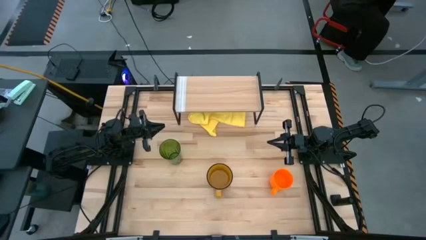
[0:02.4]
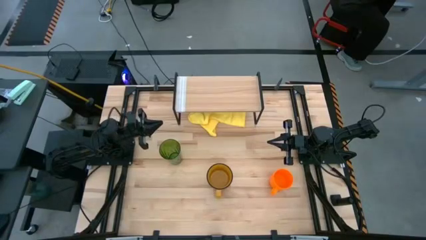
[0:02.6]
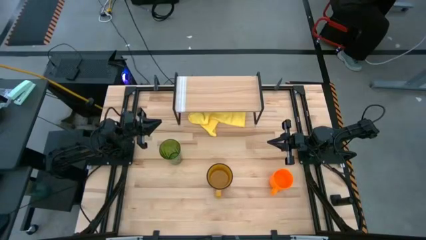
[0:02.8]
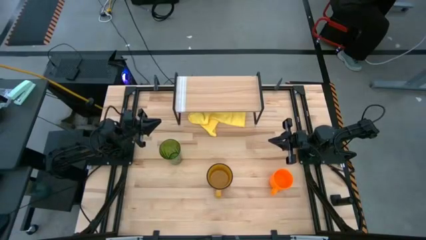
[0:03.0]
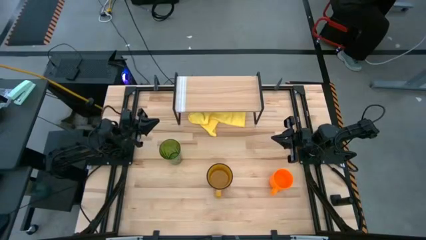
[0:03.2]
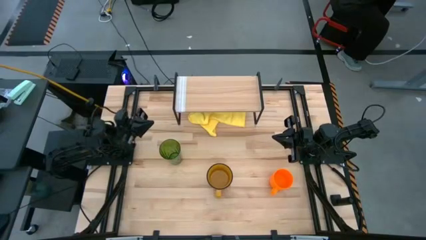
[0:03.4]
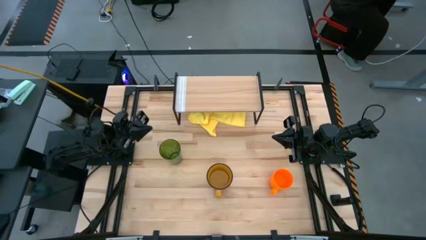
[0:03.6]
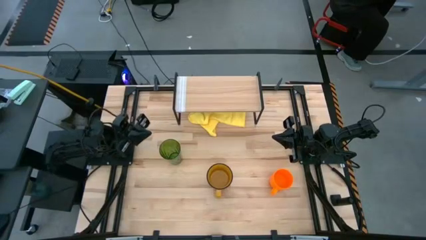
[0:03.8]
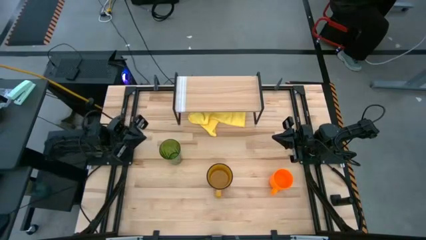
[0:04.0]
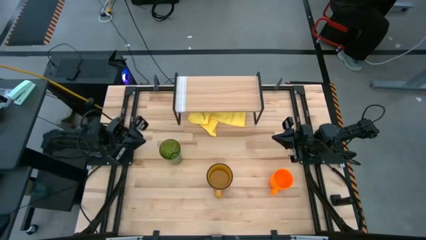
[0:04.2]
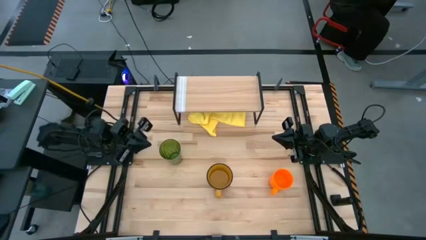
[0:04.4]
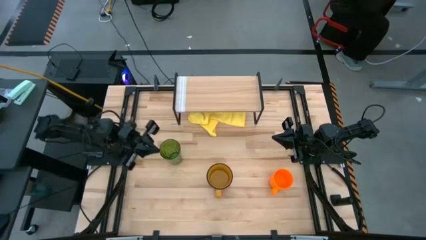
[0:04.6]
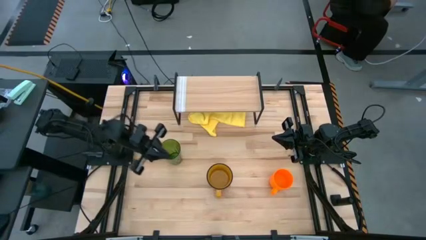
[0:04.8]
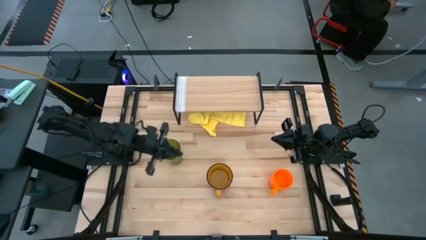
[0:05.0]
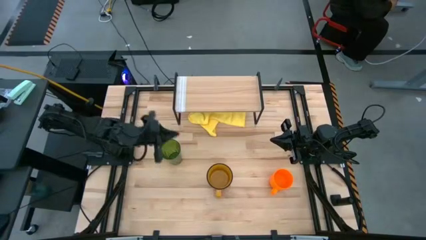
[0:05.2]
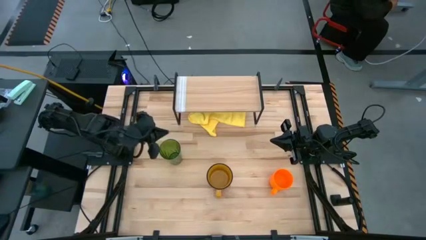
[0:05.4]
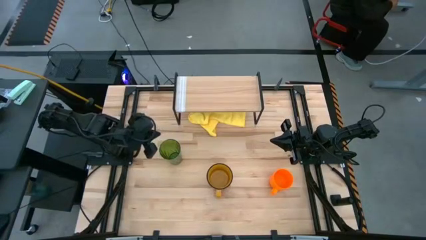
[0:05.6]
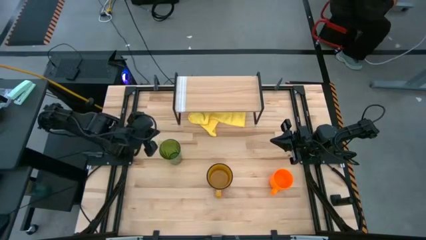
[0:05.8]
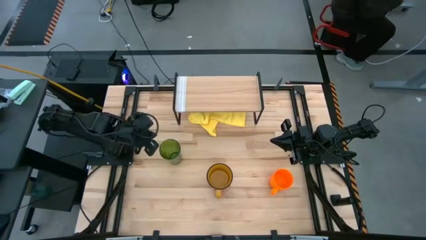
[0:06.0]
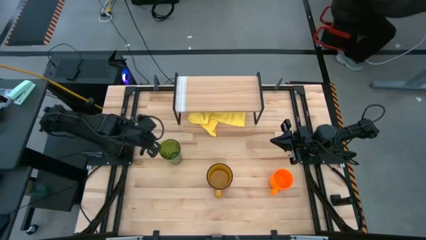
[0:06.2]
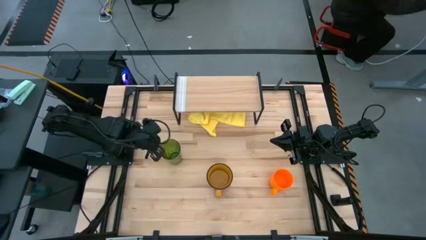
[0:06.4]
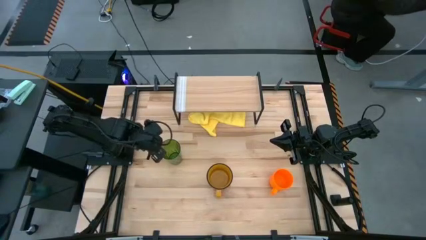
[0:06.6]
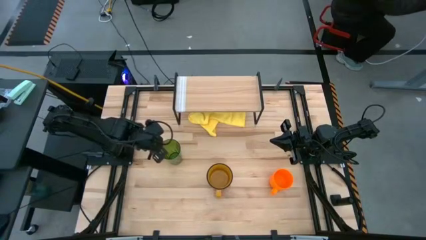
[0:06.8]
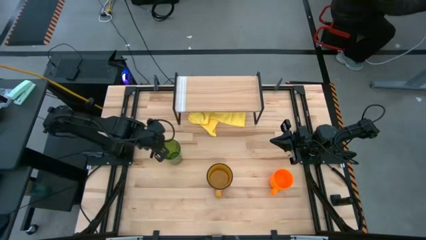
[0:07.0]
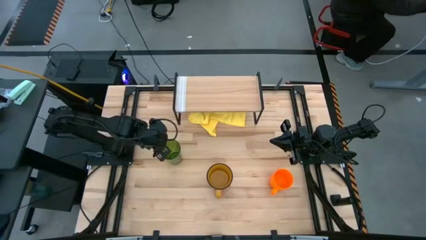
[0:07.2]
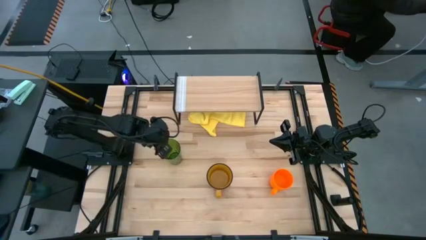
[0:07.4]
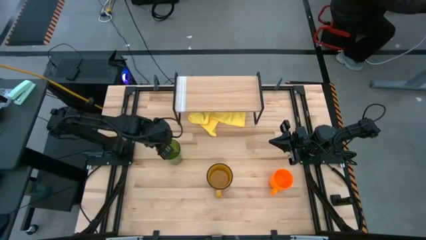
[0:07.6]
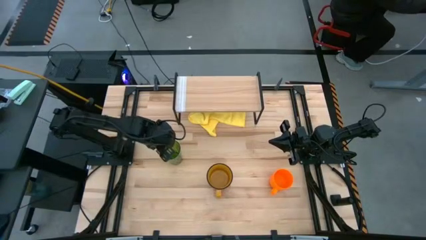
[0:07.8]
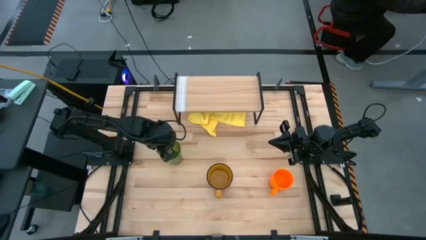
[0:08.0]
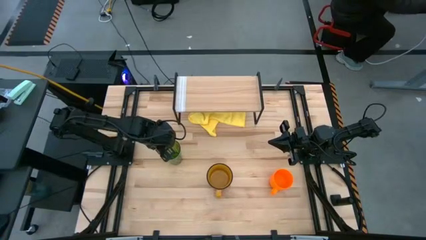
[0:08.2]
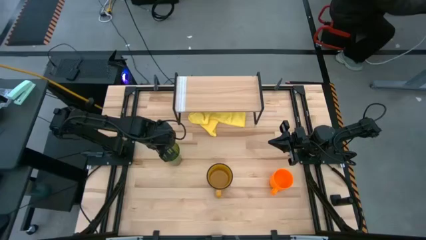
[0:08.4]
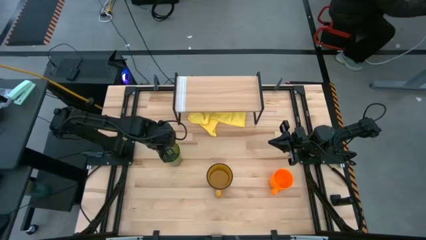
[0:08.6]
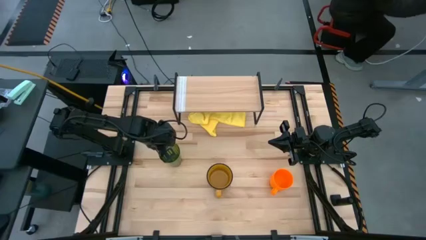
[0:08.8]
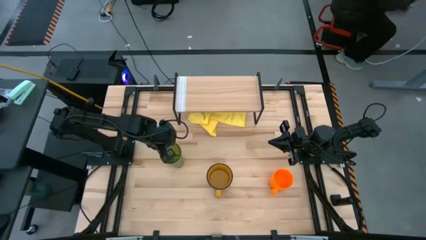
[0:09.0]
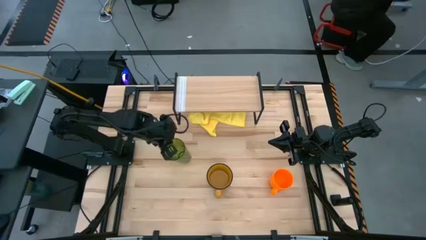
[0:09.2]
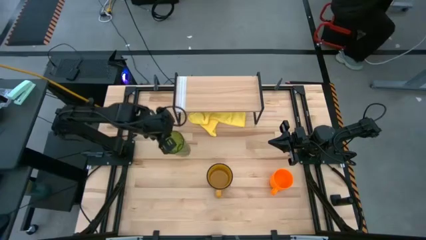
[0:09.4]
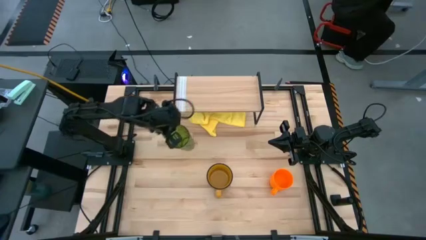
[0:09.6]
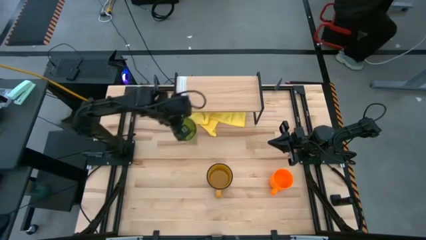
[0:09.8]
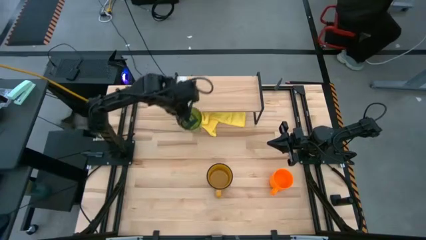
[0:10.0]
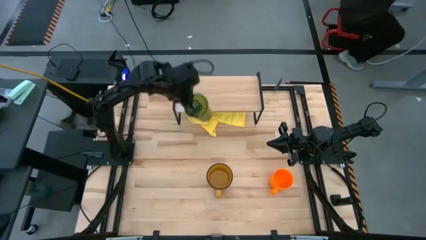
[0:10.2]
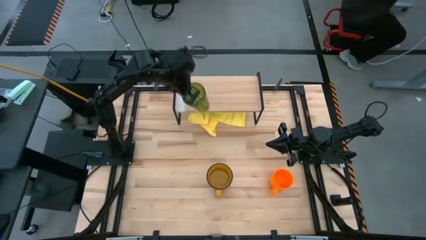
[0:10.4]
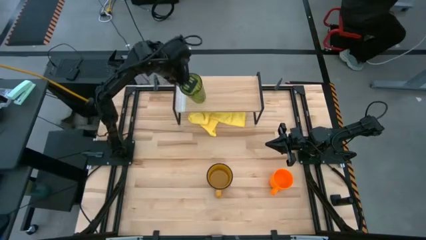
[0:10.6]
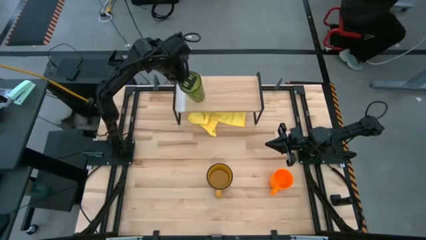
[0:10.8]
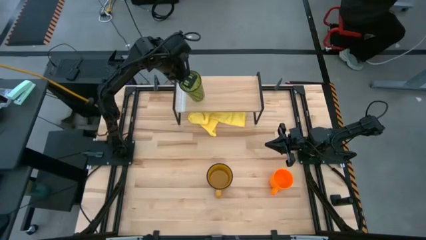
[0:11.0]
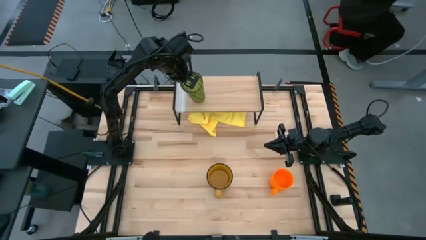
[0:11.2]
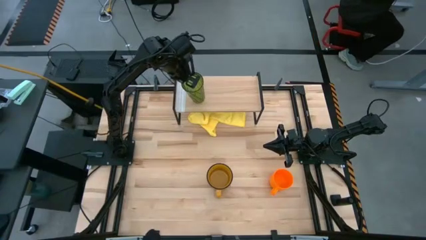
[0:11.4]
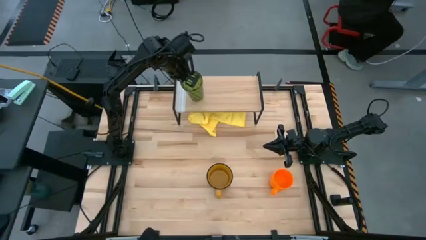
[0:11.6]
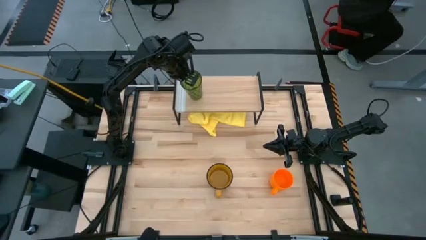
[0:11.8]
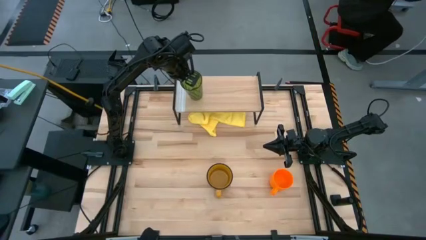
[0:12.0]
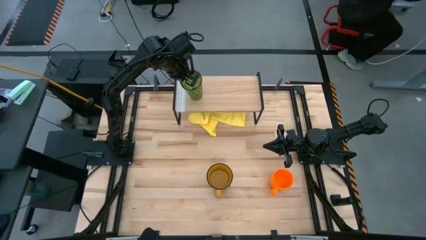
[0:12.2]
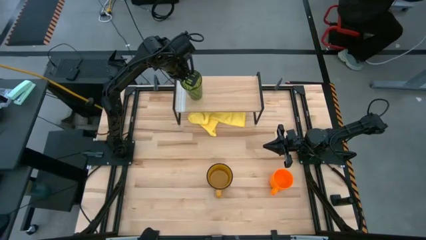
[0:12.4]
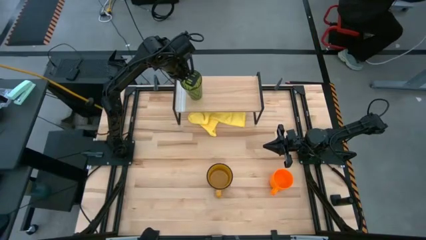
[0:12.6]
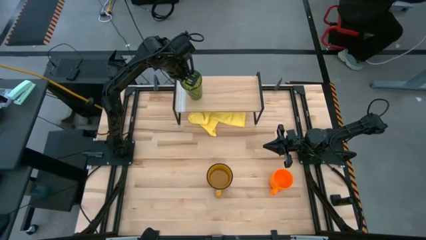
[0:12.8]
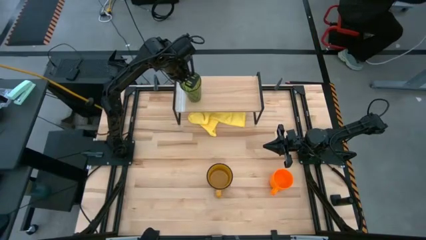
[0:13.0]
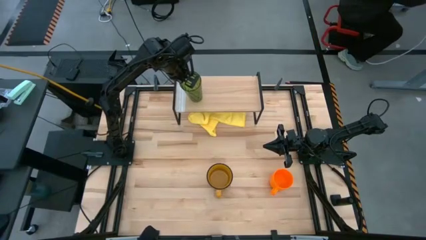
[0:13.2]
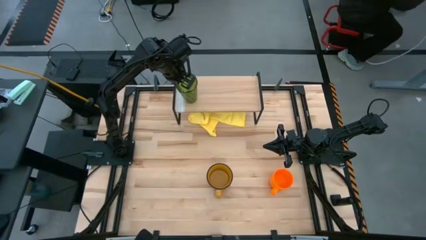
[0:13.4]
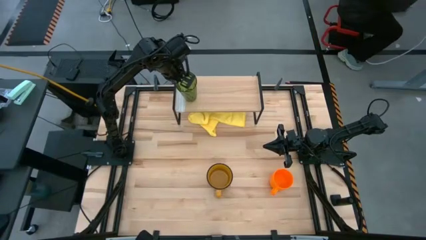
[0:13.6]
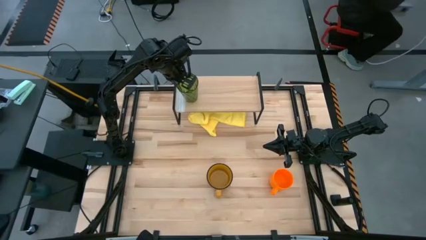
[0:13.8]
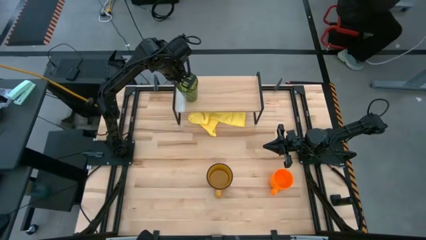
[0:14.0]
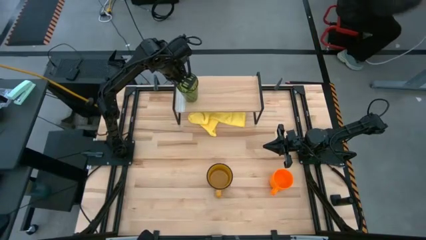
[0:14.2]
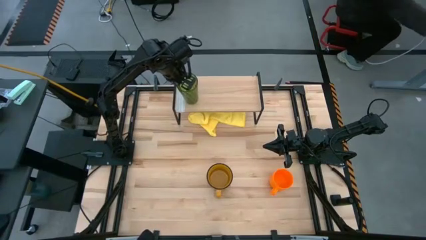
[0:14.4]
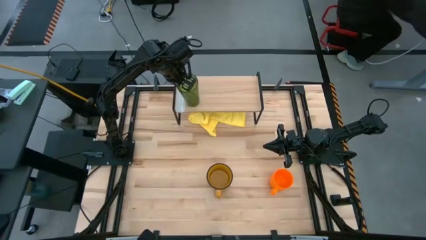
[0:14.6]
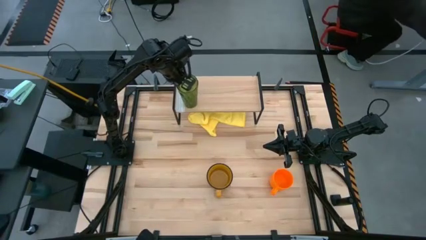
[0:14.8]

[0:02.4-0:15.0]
Task: Stack small to large cups/mugs on shelf
Put the green cup on the shelf

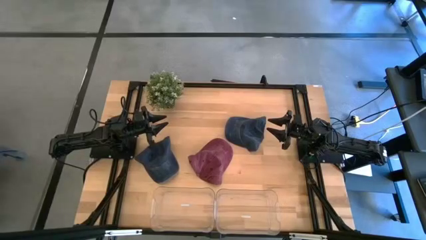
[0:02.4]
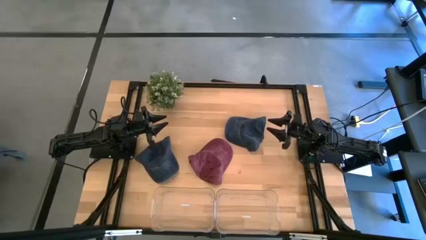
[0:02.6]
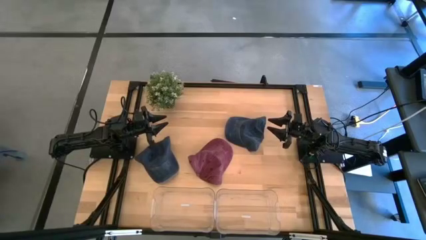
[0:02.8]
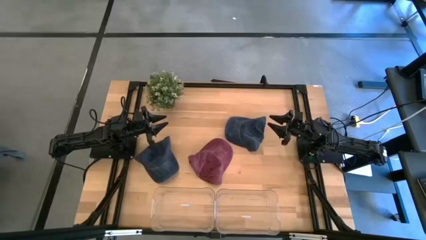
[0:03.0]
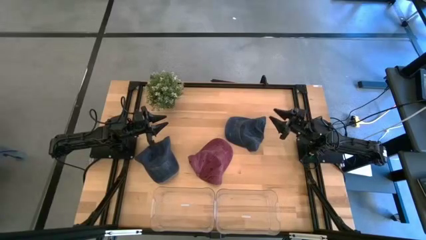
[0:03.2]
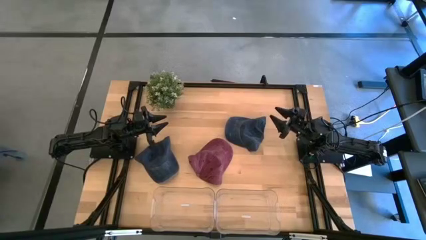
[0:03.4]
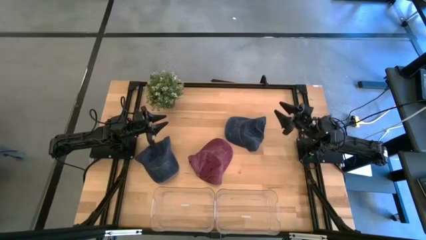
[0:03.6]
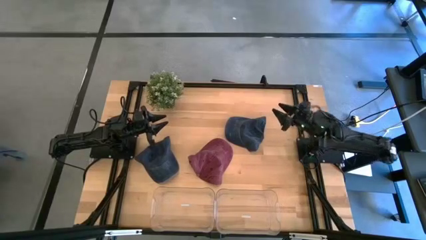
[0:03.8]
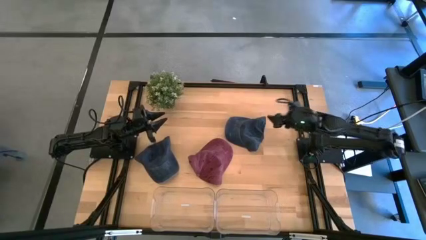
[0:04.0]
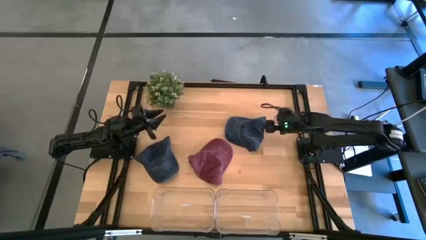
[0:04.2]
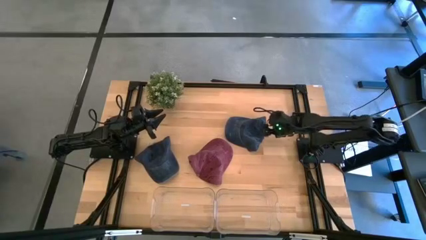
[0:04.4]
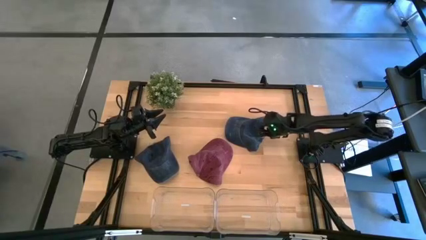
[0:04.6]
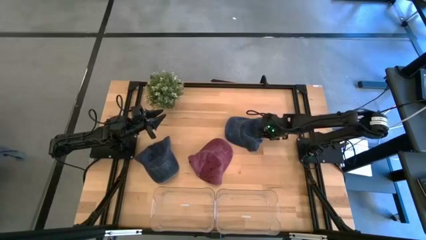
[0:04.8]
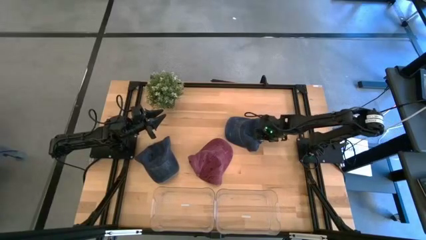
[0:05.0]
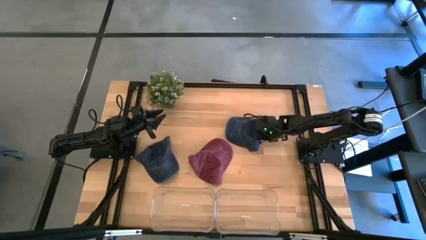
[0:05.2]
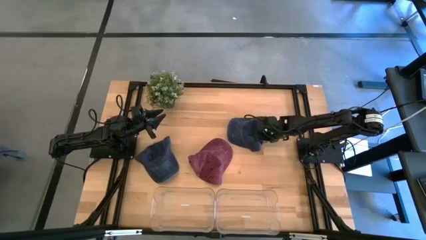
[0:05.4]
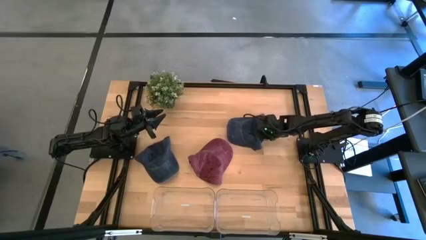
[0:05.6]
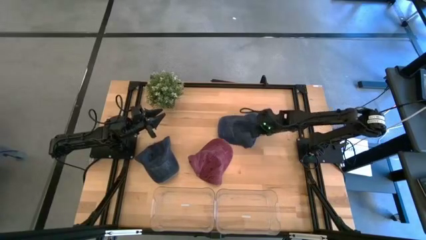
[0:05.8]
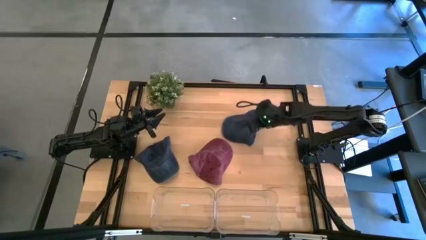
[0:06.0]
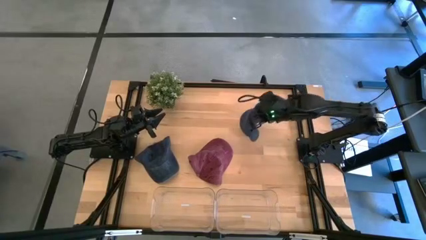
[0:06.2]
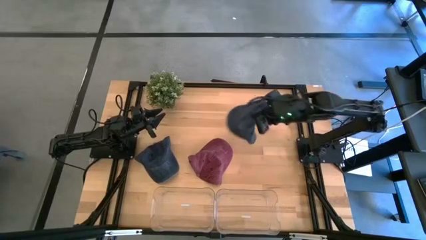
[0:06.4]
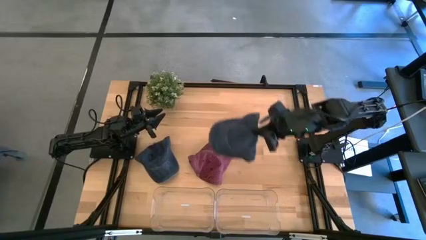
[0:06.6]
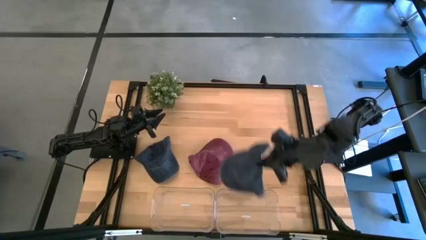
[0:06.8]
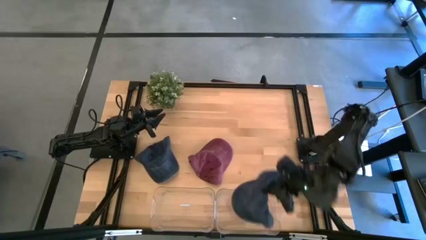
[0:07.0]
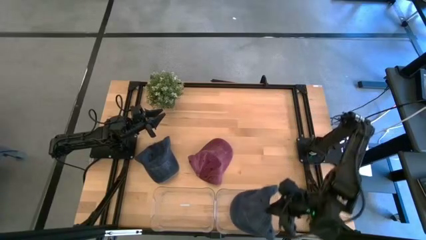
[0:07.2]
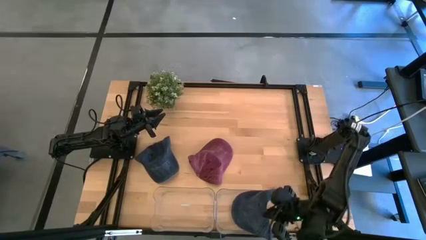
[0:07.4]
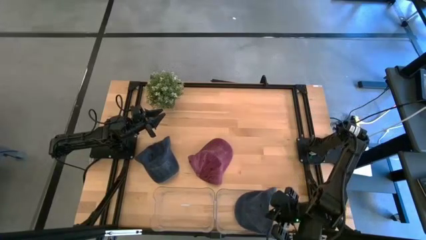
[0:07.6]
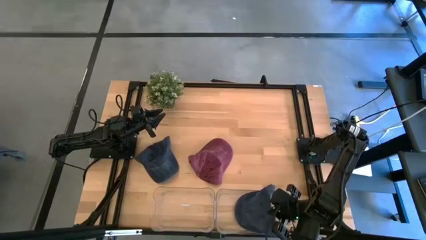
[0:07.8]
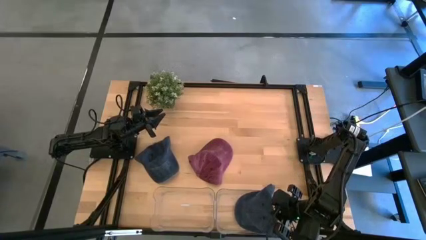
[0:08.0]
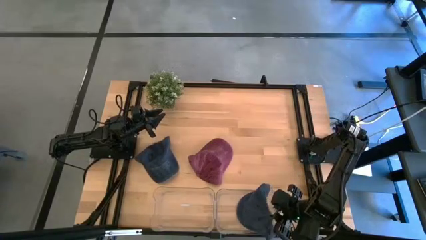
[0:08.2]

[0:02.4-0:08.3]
Task: Pick & Place hat
Put the right black cap into the right transparent bin
